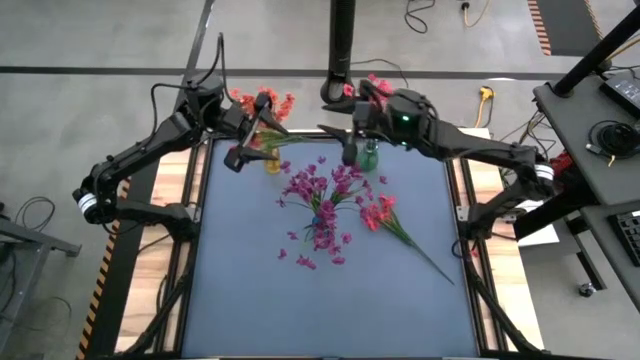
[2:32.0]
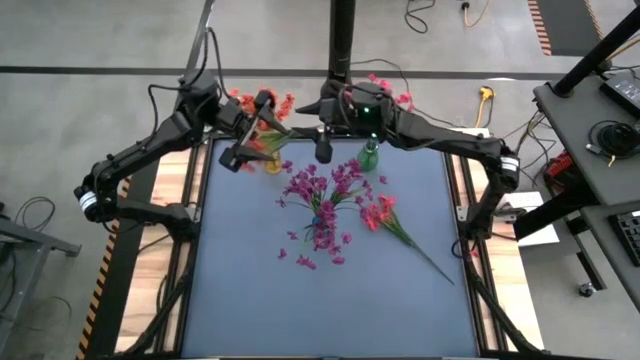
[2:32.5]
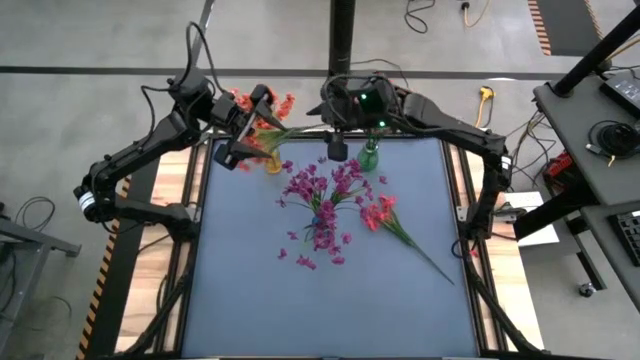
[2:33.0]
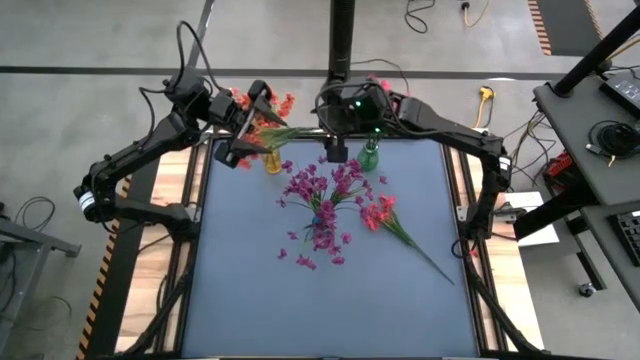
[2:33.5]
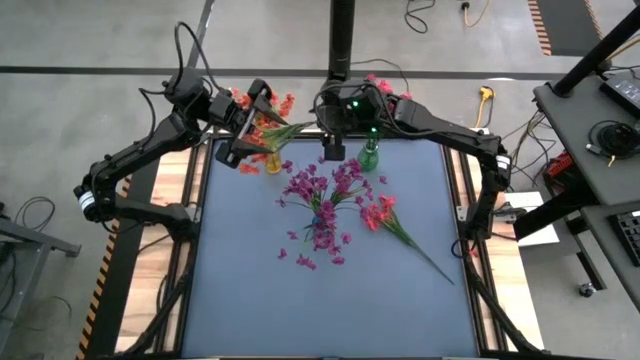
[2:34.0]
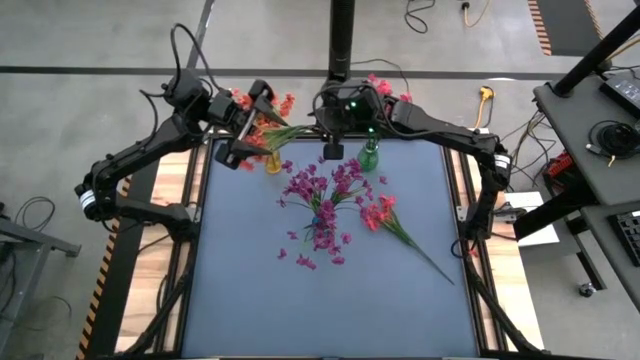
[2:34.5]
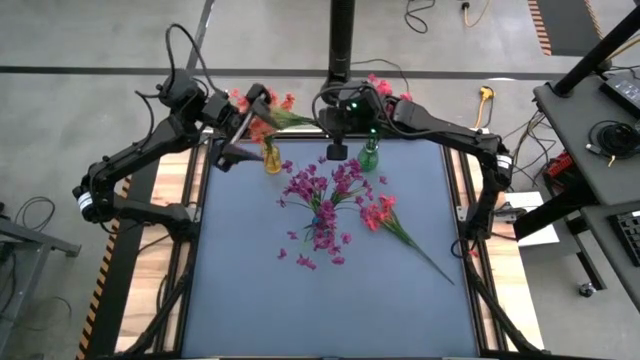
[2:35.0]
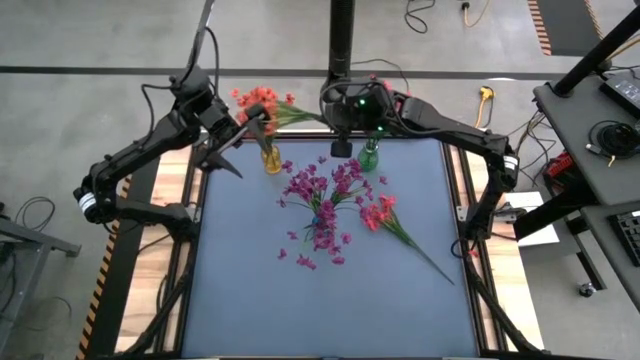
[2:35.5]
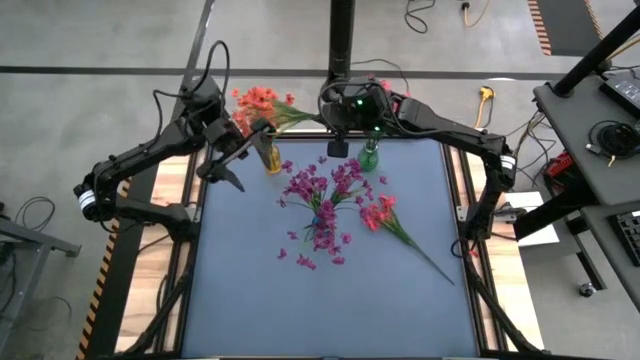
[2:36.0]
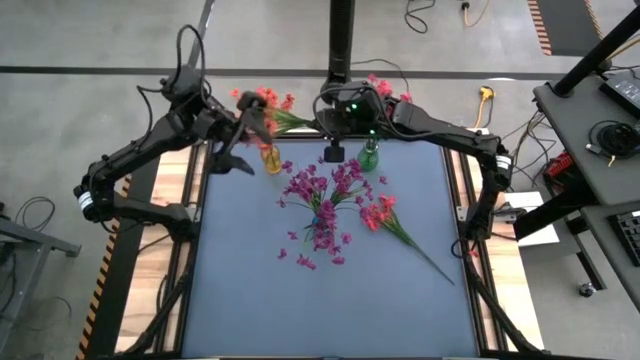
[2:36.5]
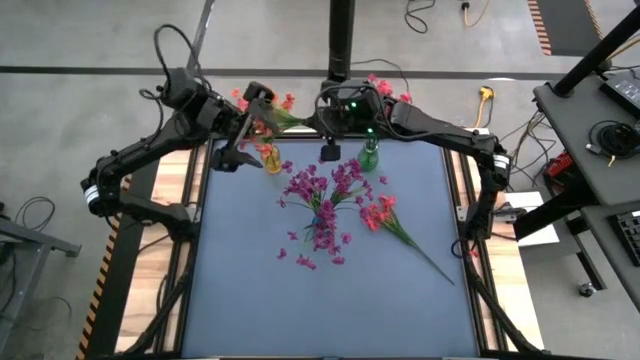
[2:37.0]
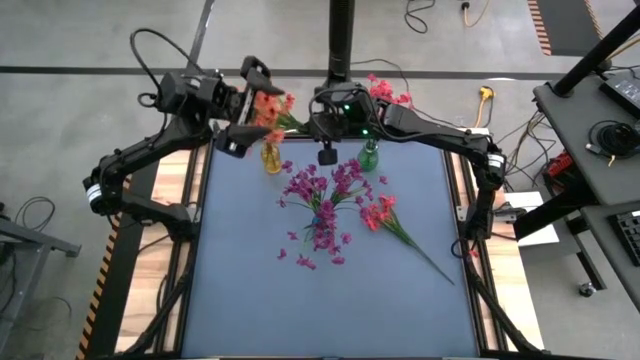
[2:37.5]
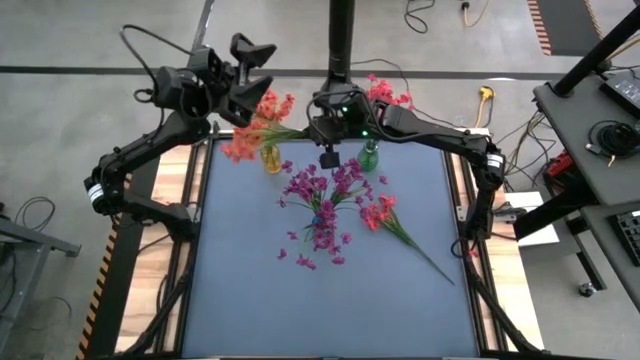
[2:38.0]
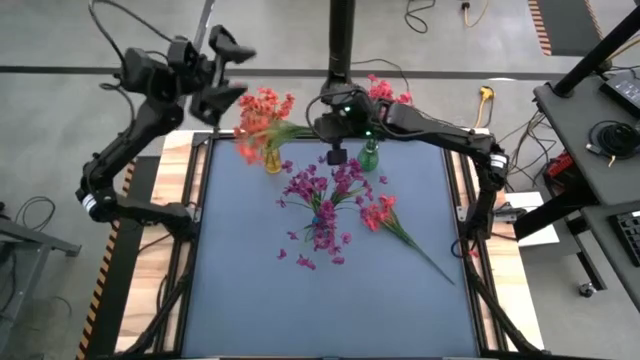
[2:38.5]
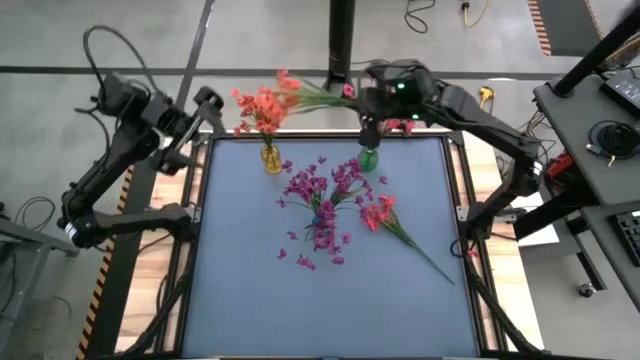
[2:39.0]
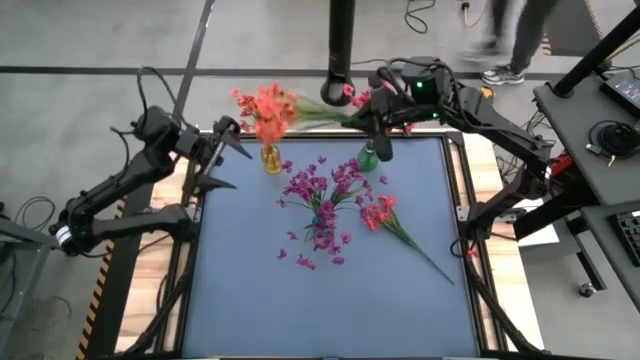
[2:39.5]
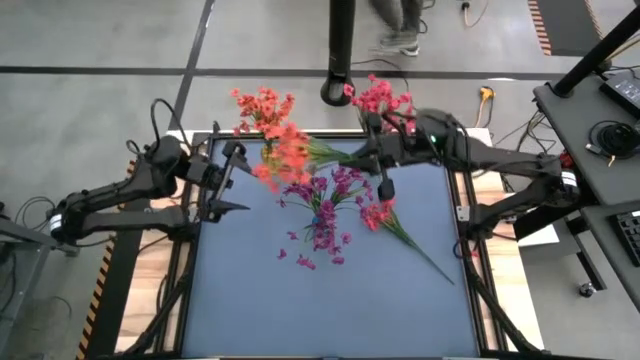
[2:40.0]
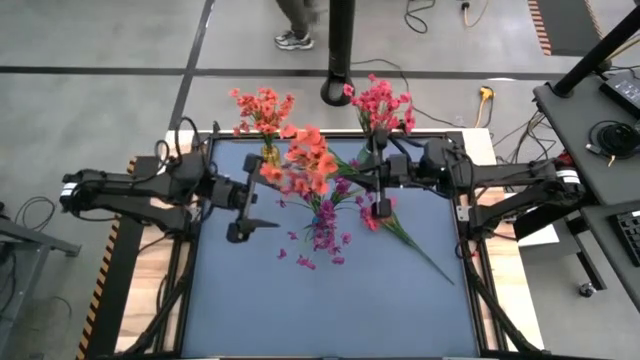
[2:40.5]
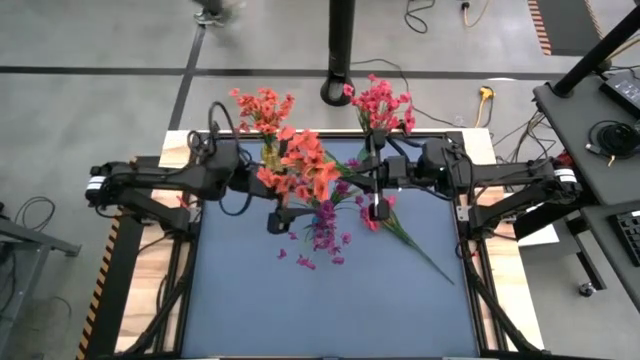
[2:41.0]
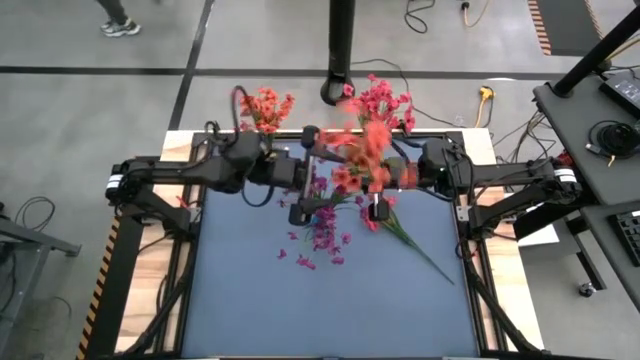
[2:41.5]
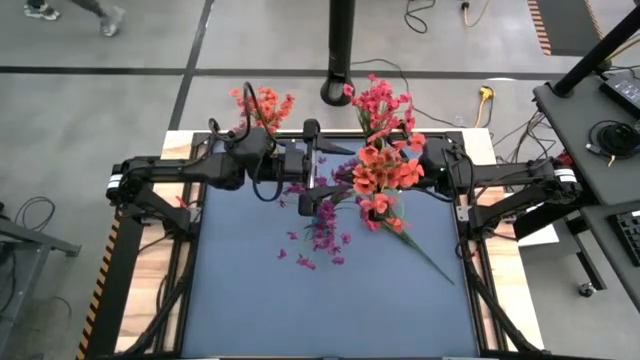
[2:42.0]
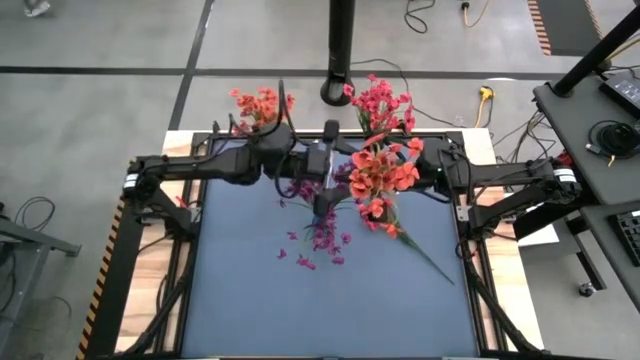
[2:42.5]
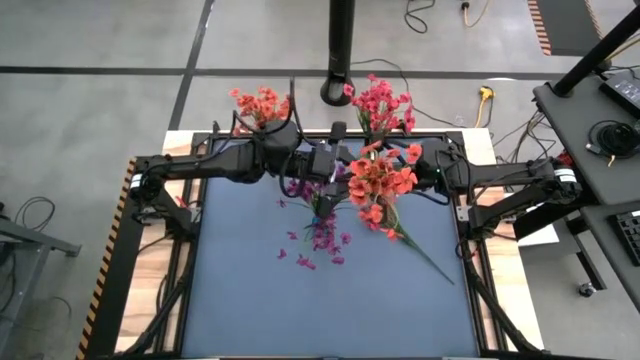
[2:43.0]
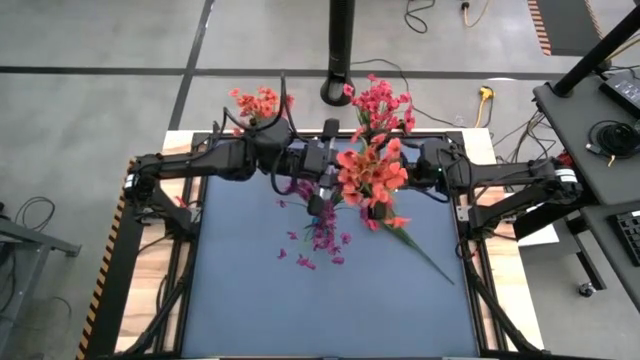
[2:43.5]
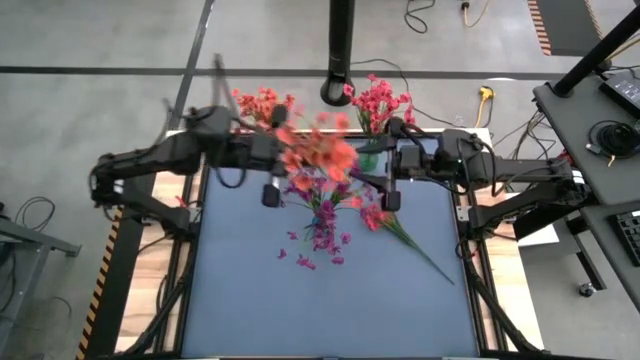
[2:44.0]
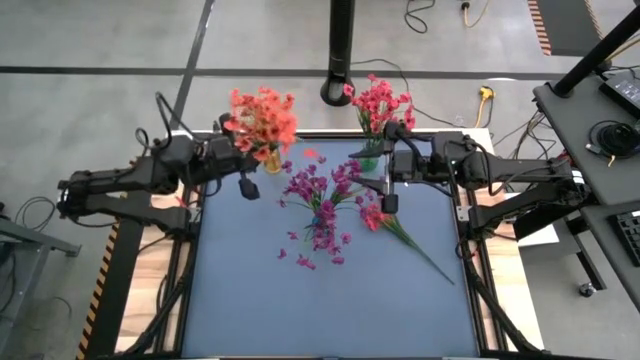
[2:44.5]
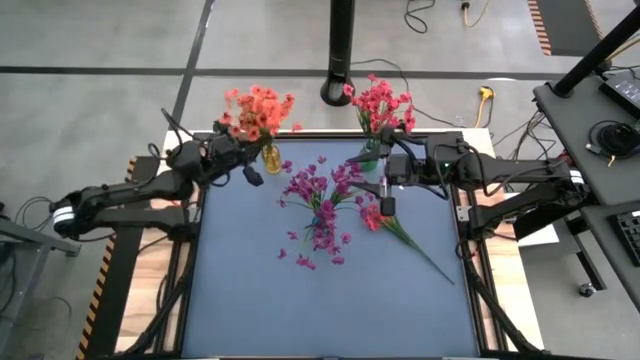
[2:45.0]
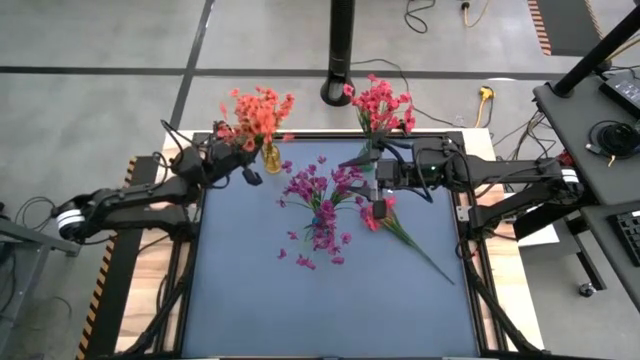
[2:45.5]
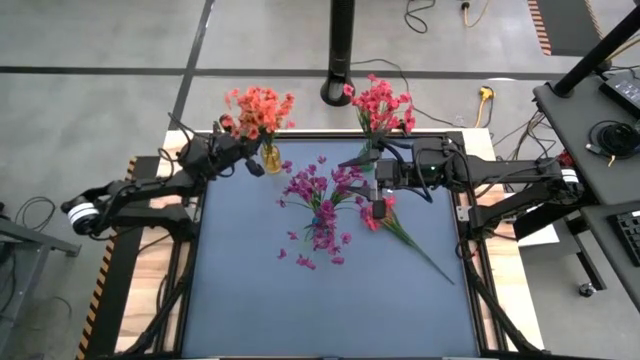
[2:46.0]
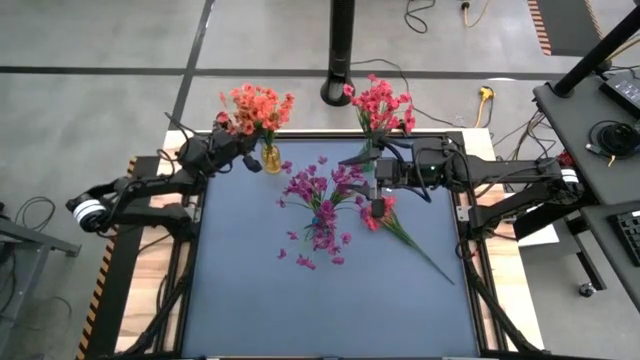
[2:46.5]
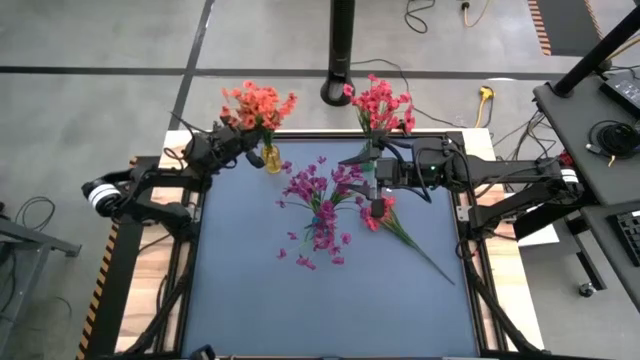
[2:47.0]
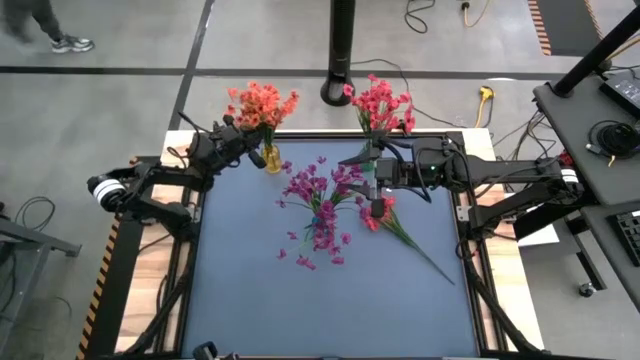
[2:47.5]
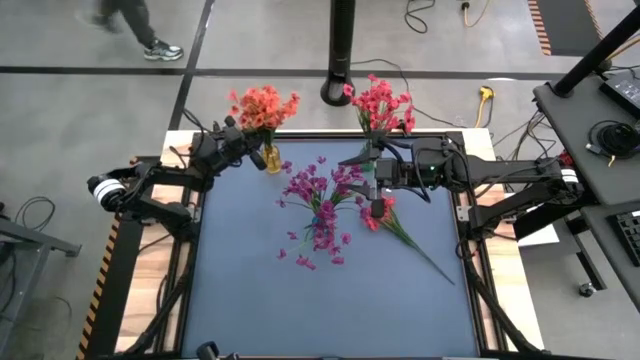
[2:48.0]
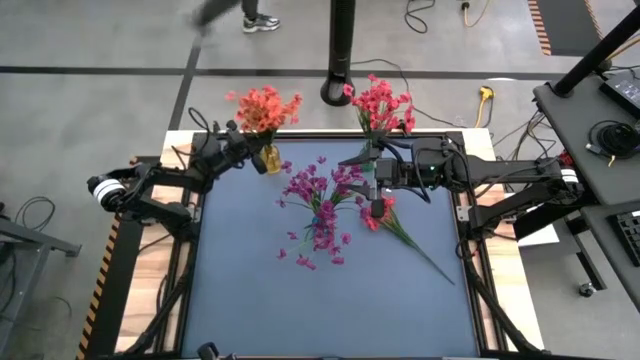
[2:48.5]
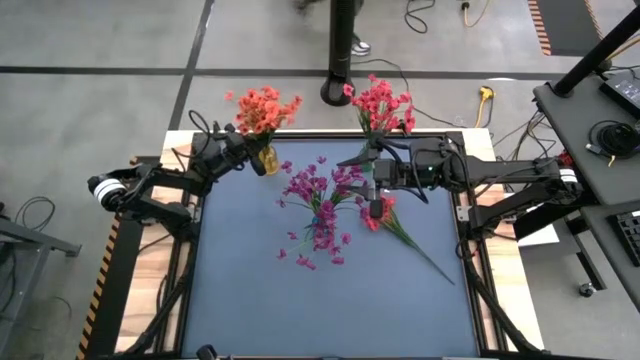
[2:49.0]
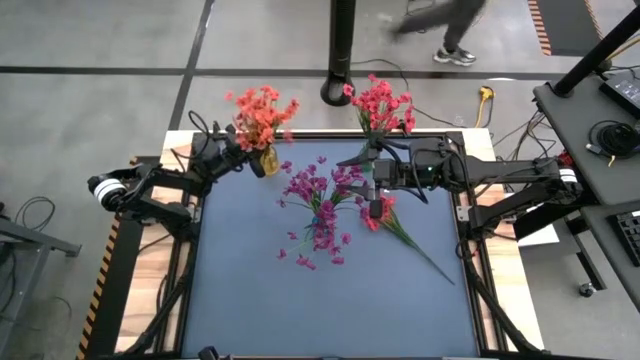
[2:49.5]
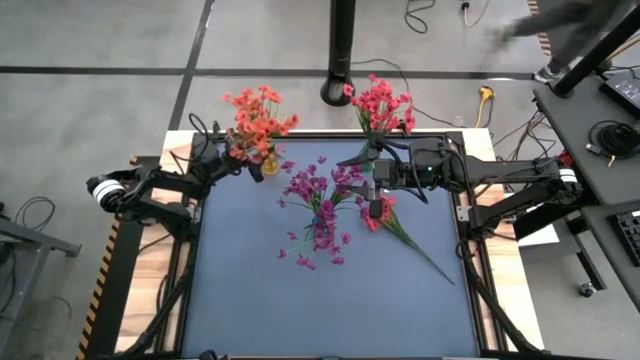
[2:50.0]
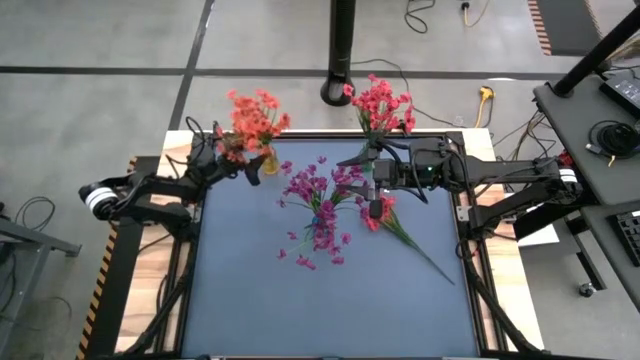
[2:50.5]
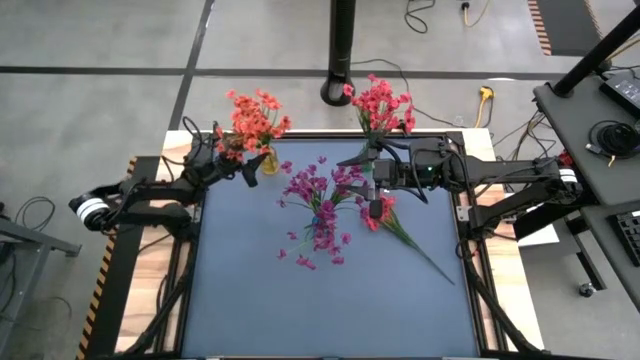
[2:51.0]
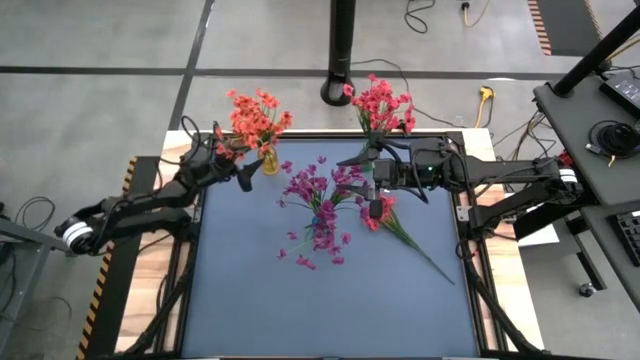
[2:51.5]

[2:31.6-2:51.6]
Task: Sort flowers into vase by color
Put the orange flower into the yellow vase

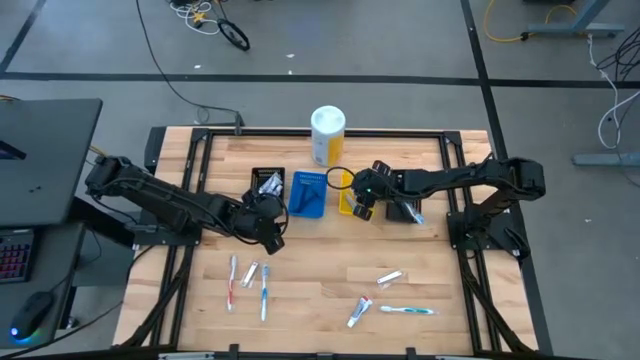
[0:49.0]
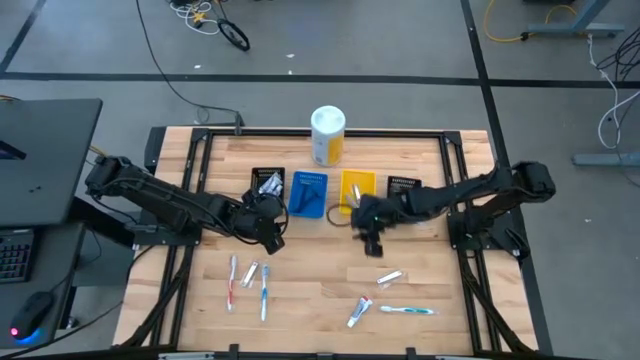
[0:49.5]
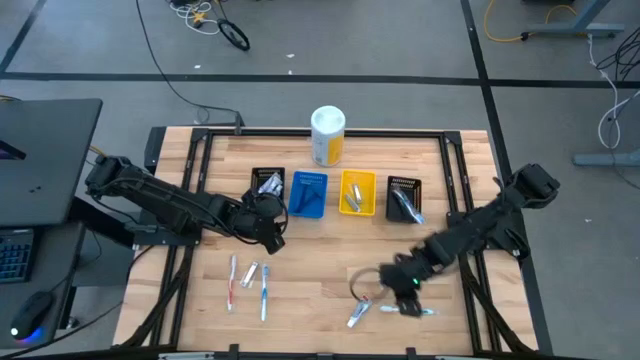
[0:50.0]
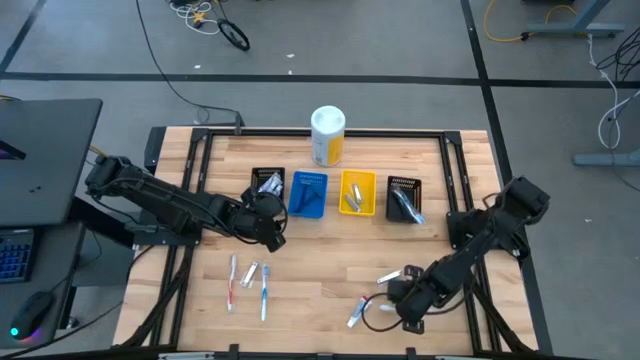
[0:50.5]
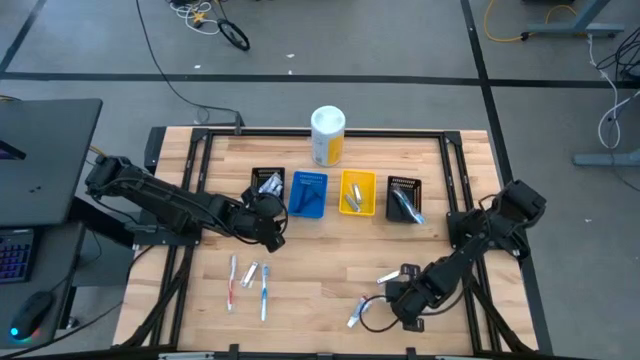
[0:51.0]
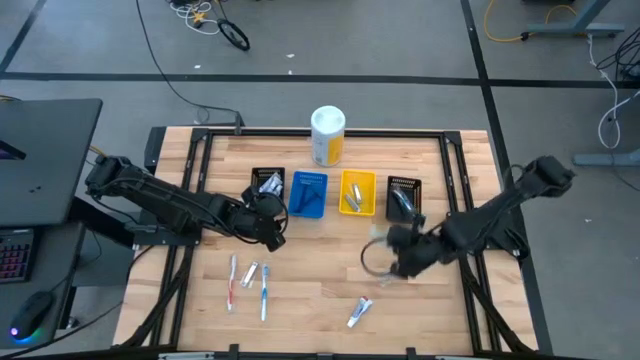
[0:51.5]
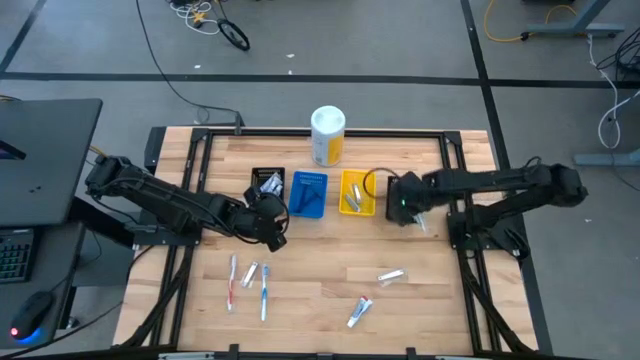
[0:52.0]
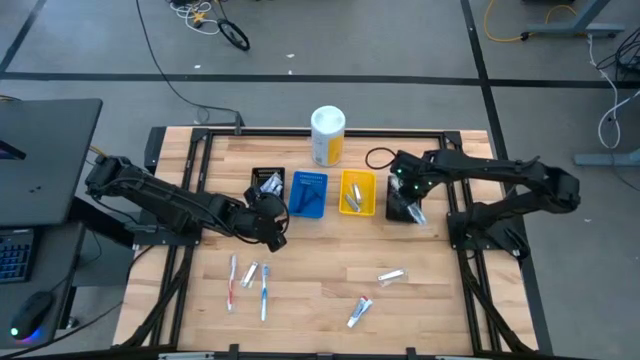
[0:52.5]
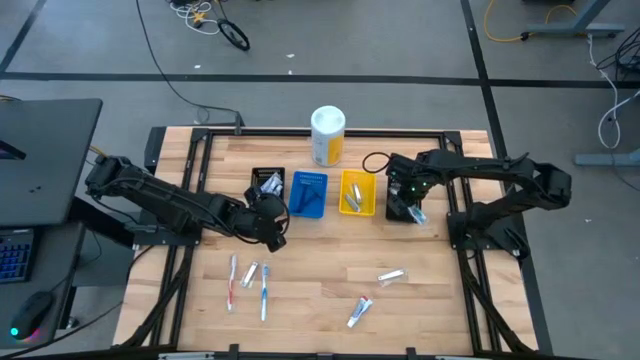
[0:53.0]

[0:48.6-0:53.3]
Task: Pick & Place Travel size toiletries
Put the green toothbrush into the right black bin
